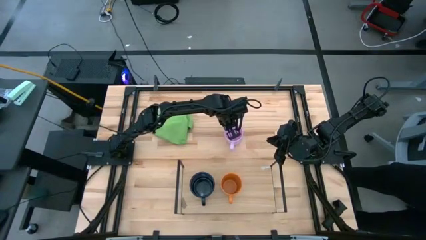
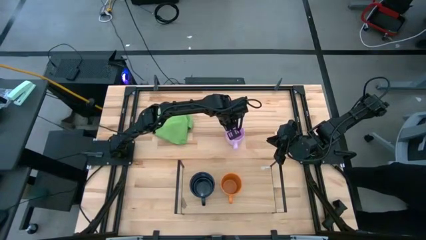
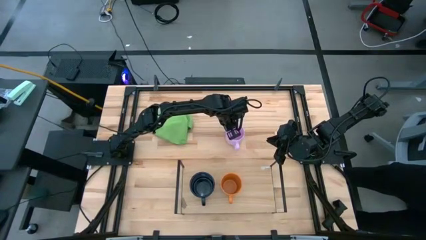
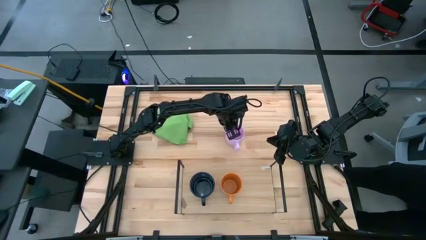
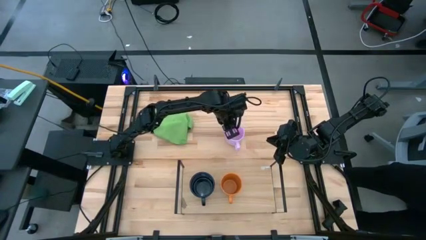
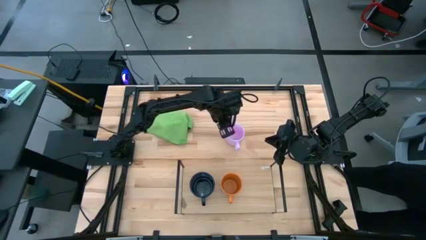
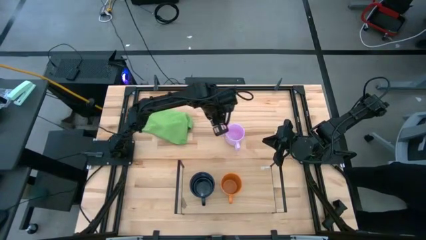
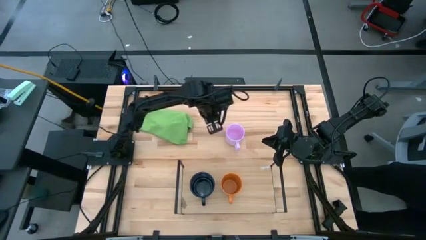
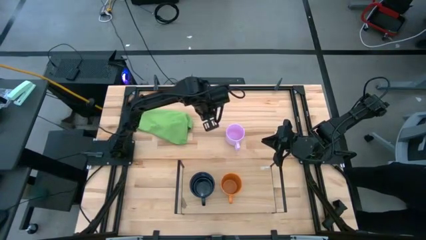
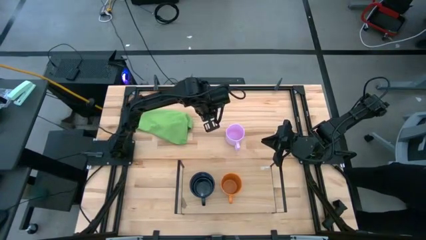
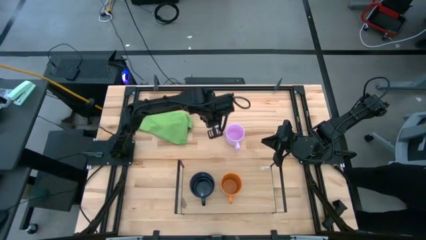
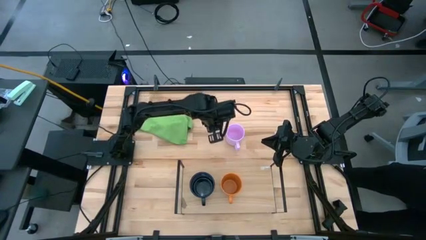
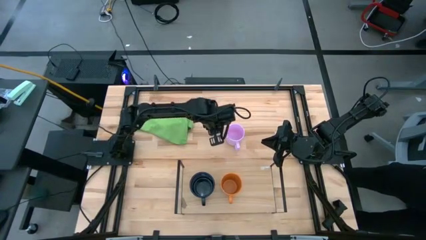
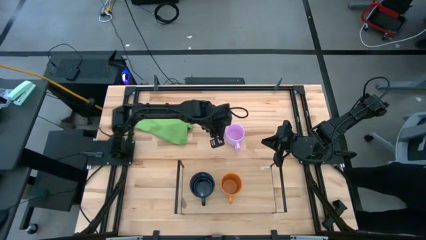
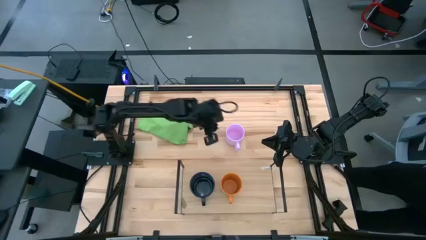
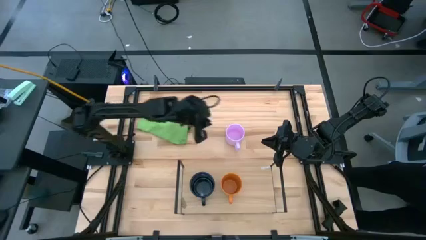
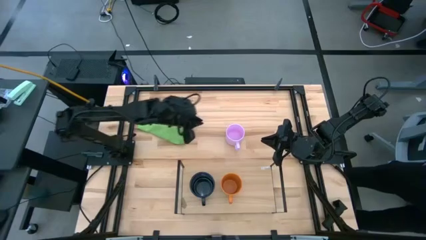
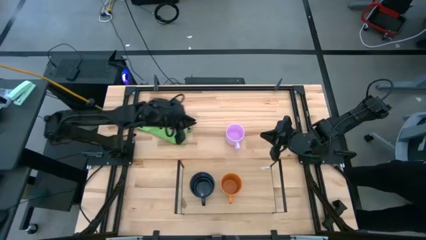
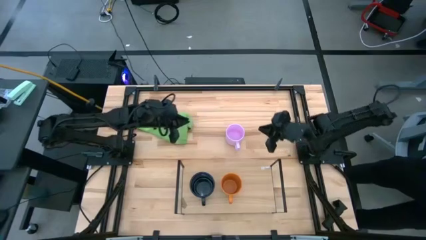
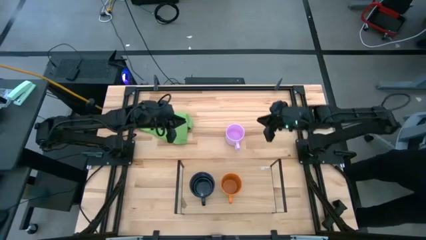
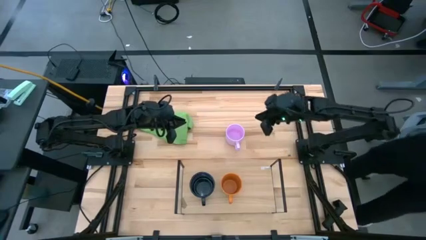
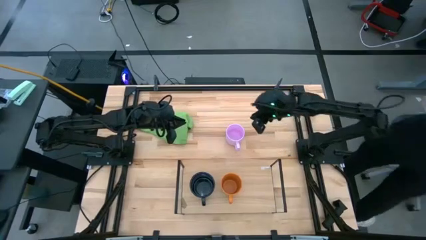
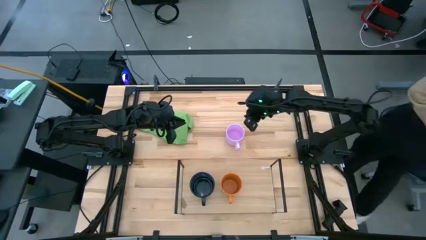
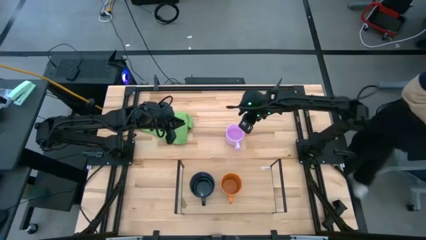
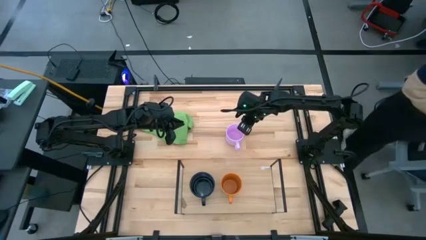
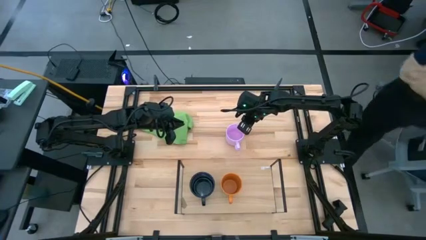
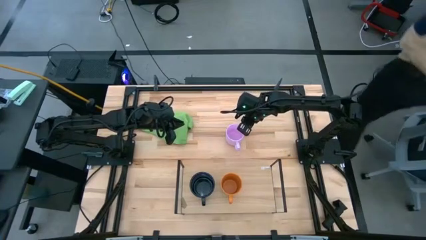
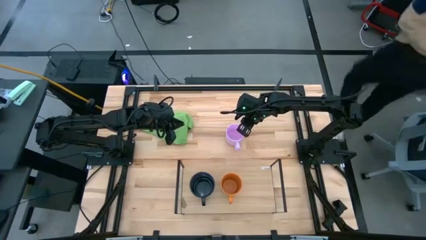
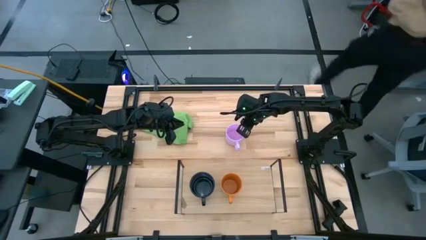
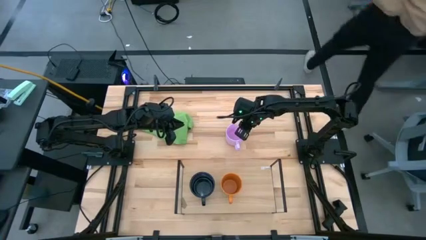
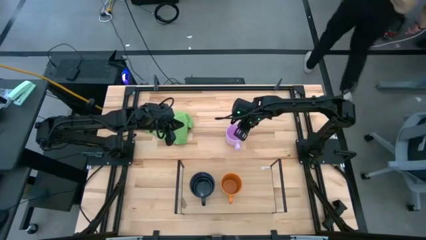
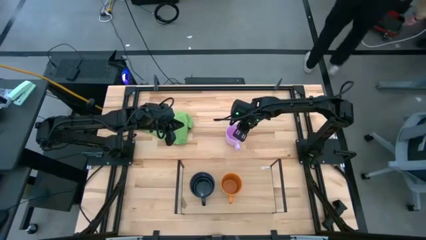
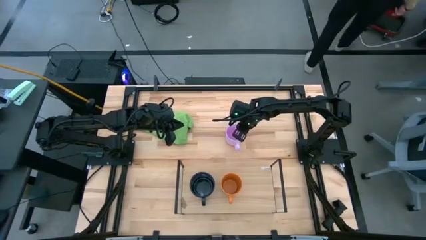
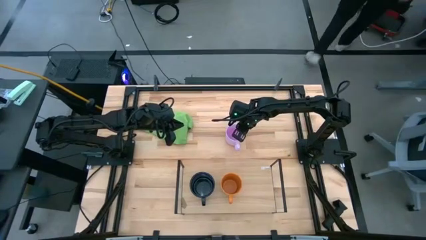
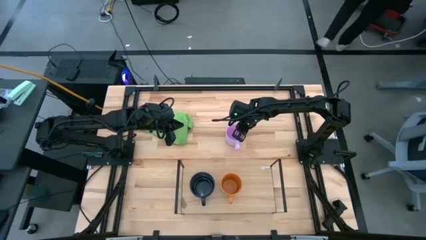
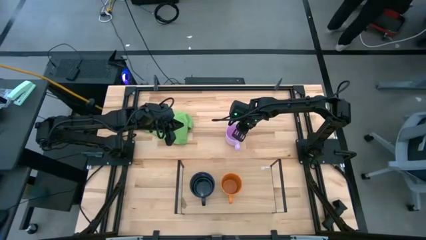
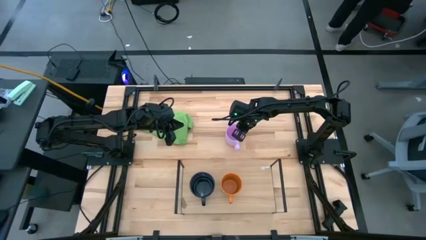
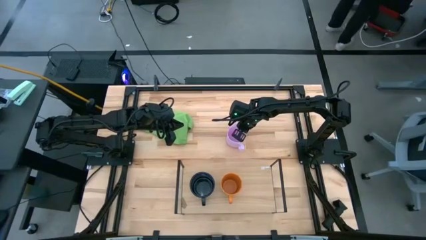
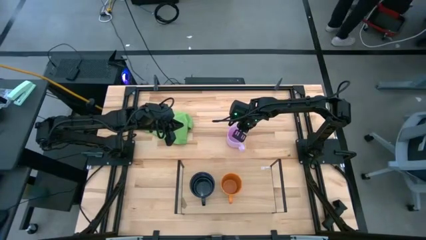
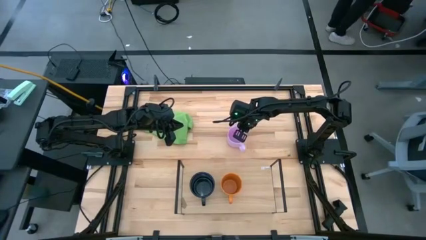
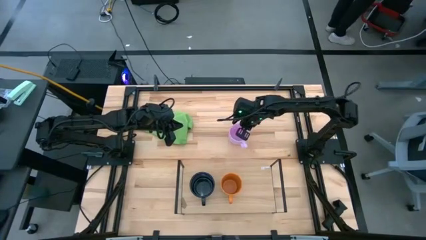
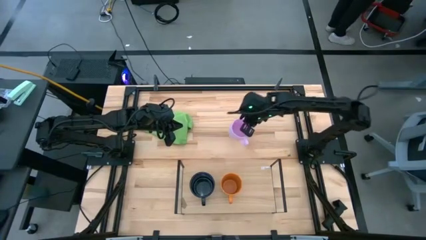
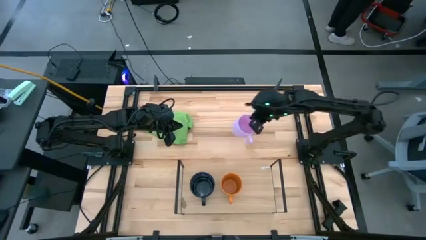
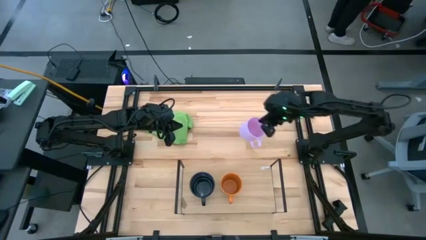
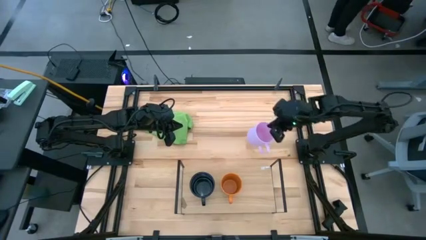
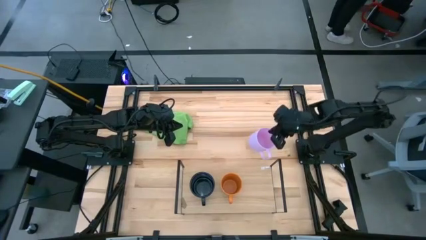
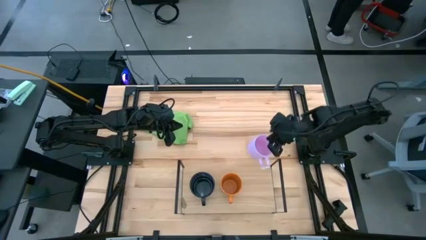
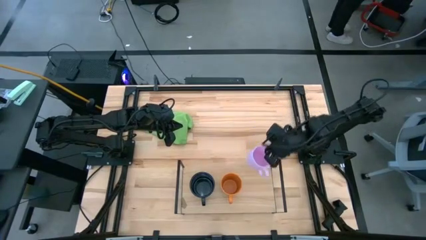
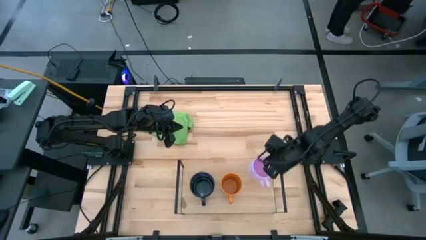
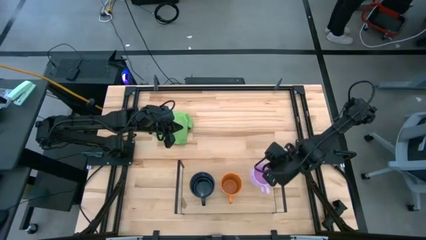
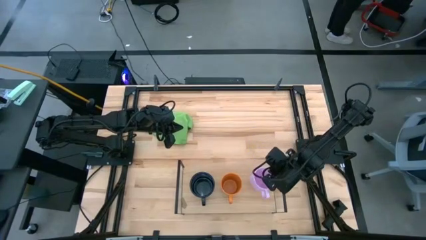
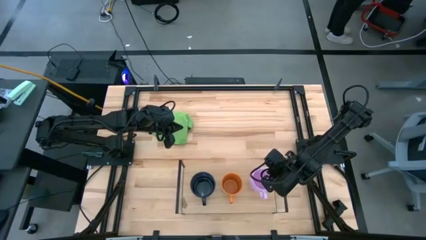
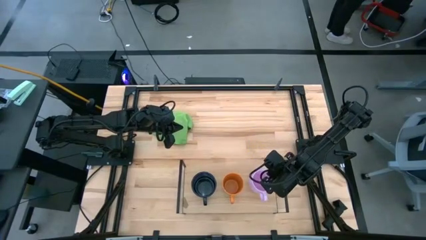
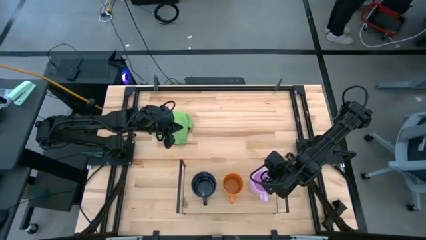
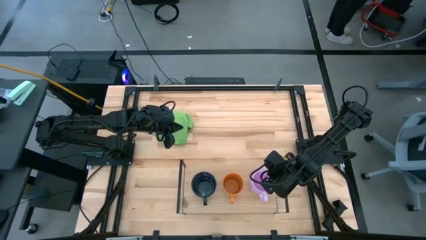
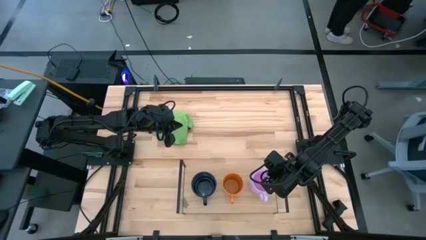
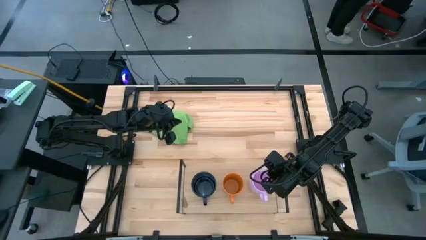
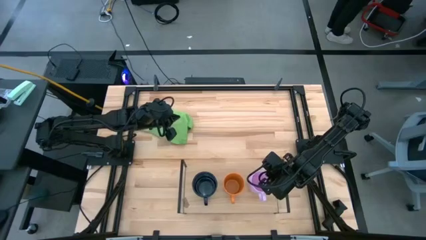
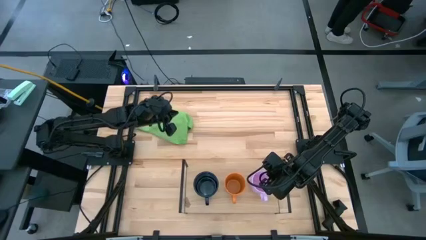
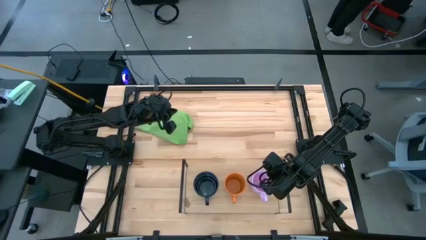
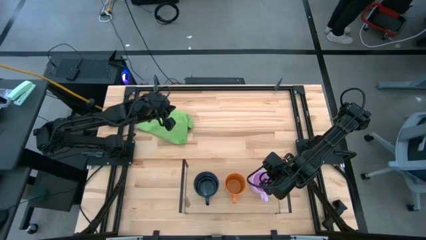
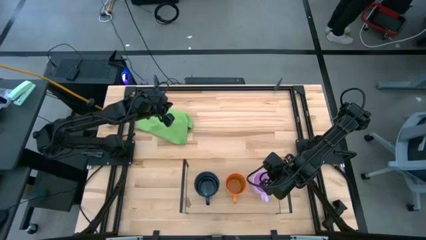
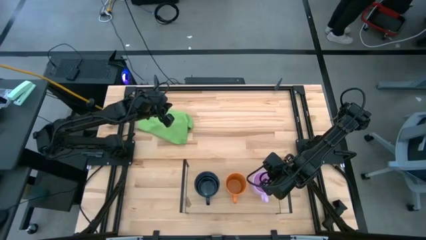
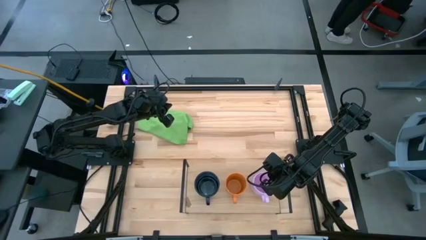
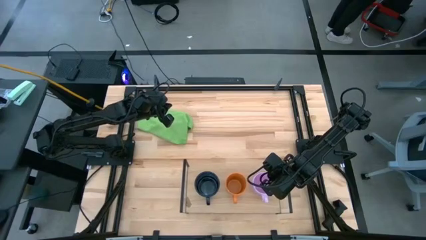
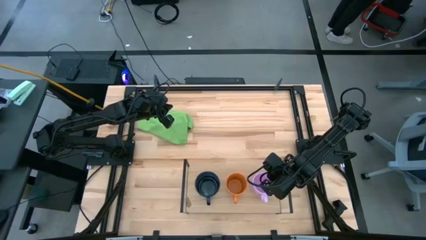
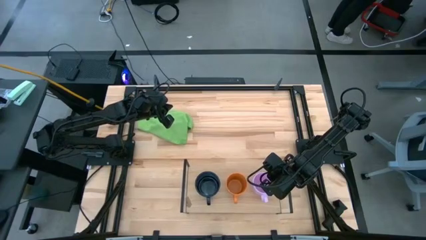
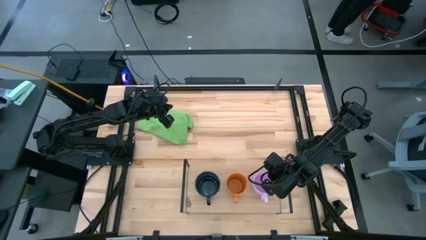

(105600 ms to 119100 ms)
Task: Stack small to large cups/mugs on shelf
Put the pink mug on the shelf
